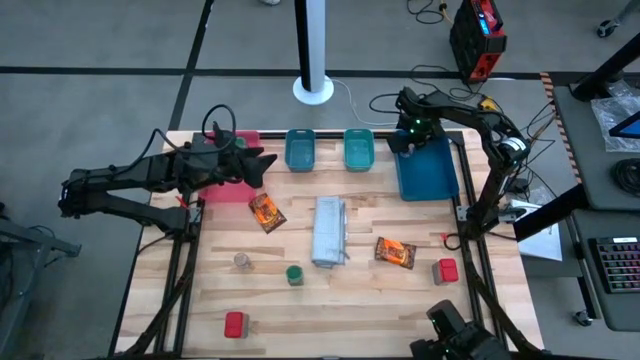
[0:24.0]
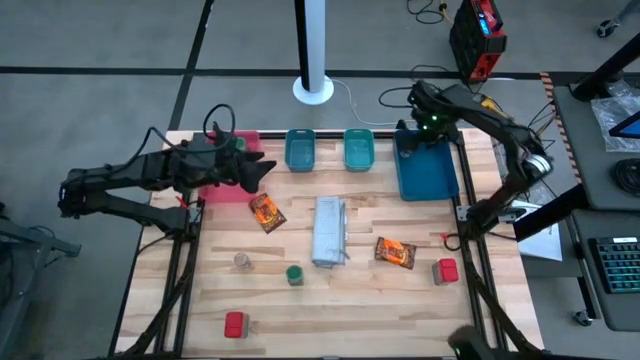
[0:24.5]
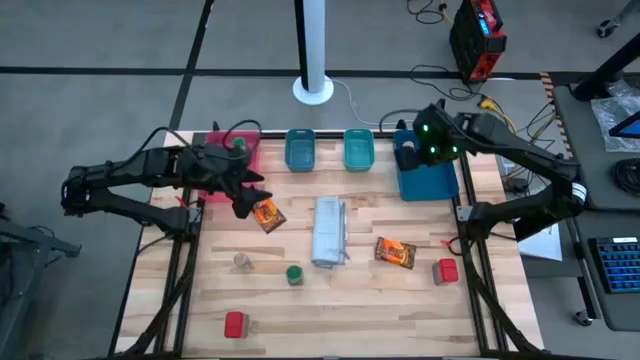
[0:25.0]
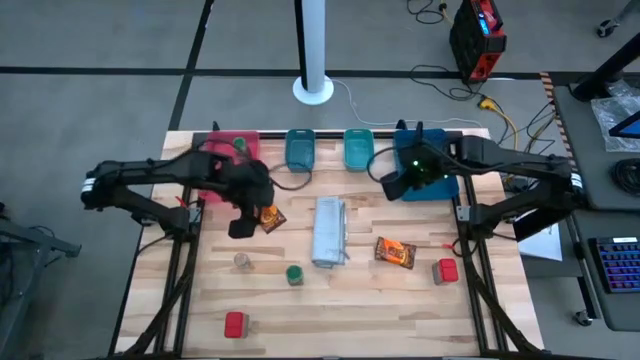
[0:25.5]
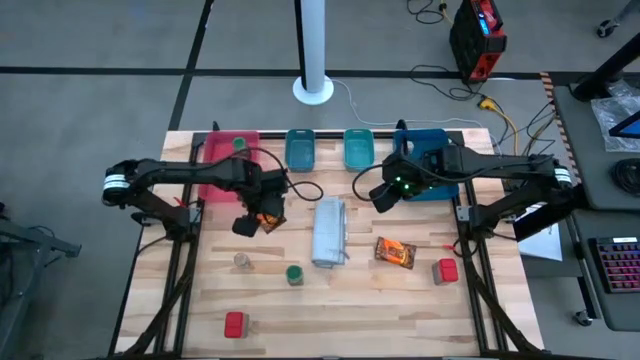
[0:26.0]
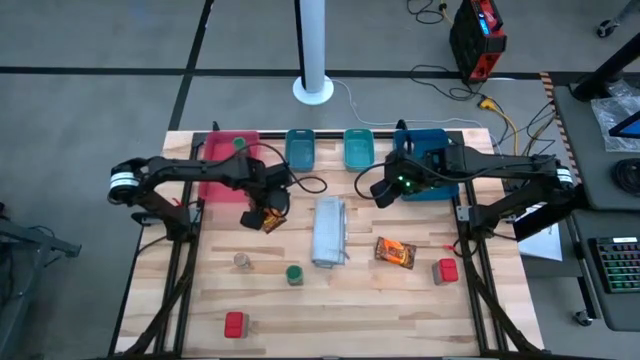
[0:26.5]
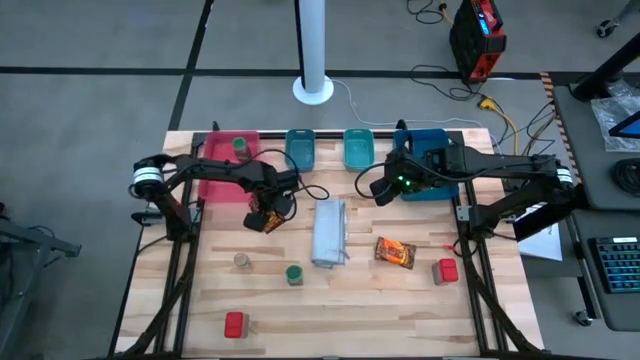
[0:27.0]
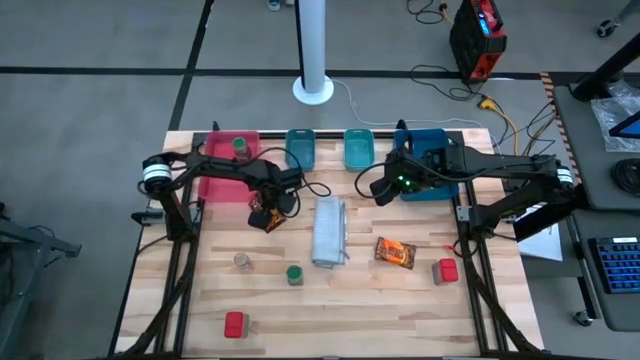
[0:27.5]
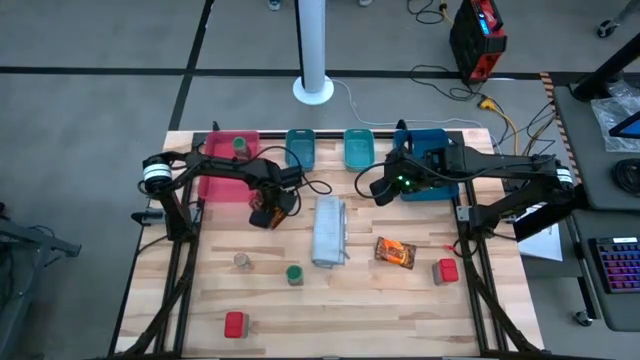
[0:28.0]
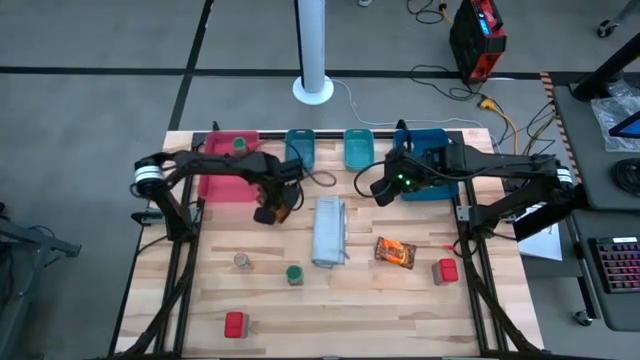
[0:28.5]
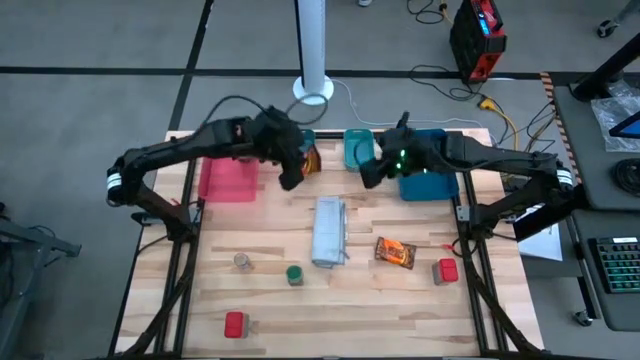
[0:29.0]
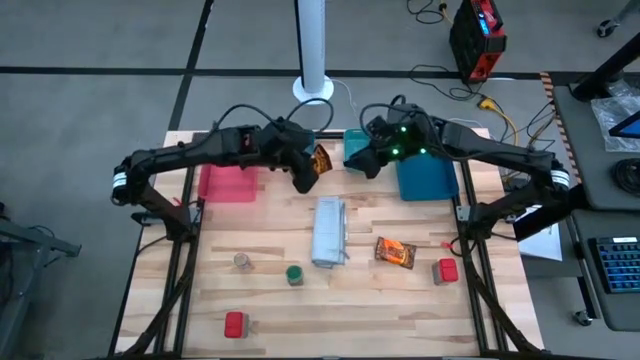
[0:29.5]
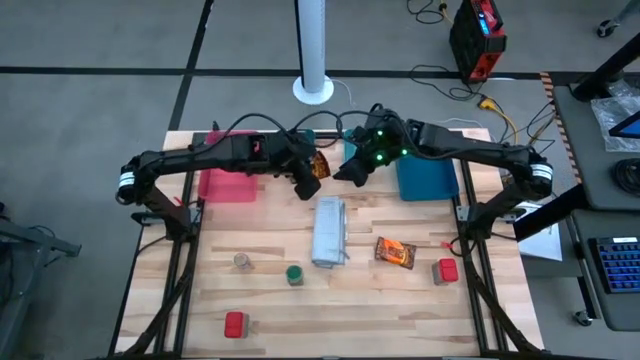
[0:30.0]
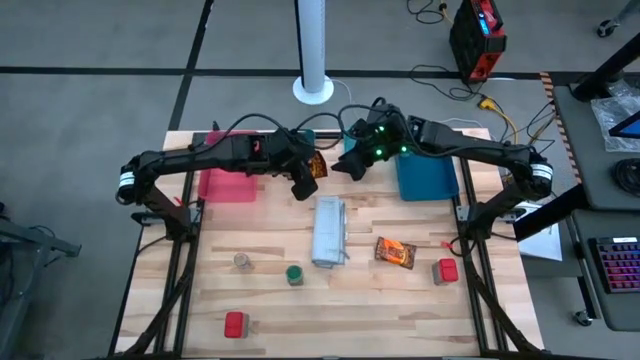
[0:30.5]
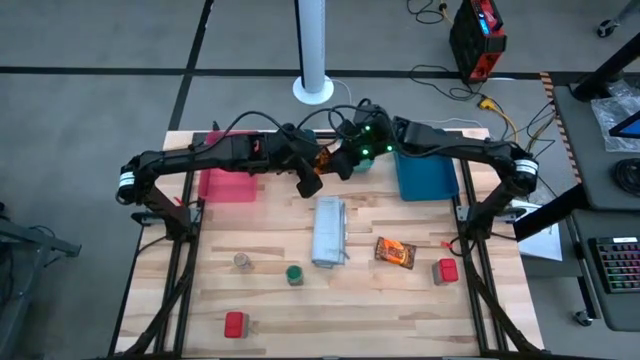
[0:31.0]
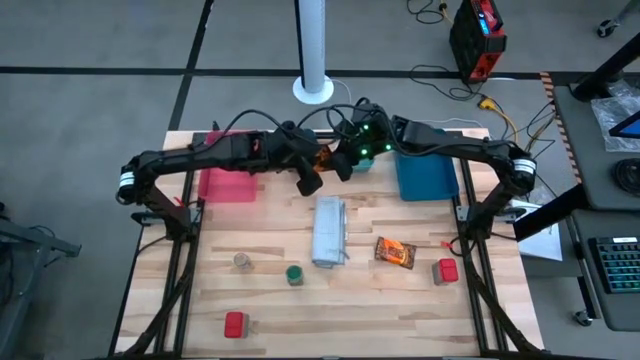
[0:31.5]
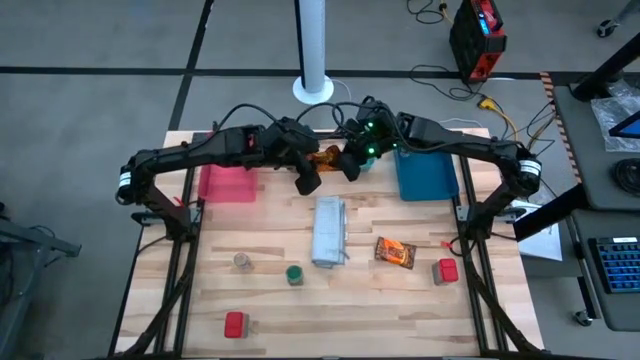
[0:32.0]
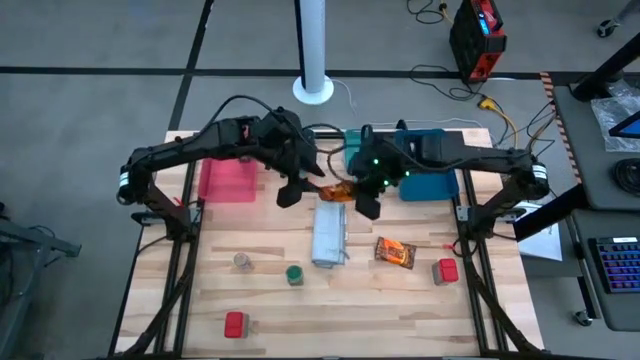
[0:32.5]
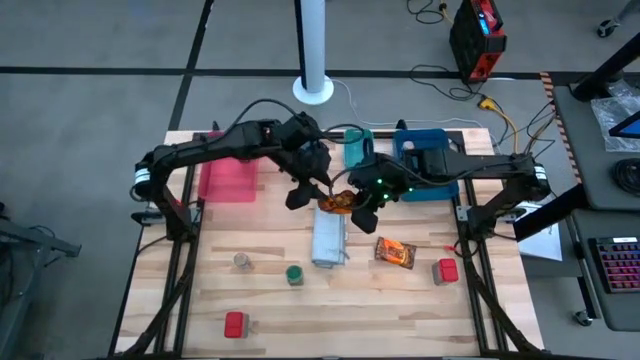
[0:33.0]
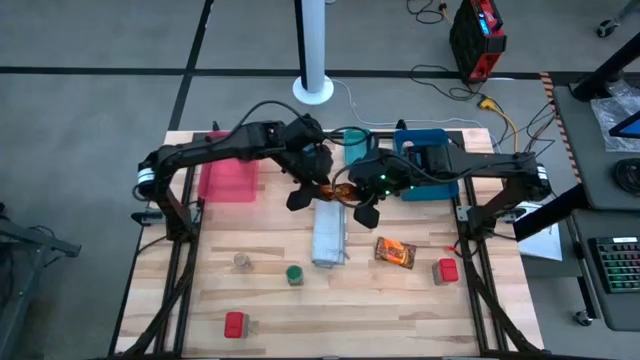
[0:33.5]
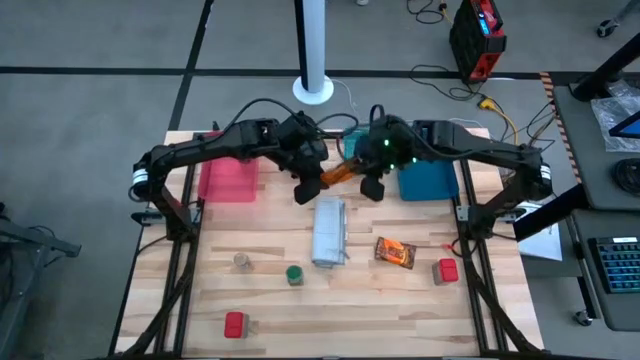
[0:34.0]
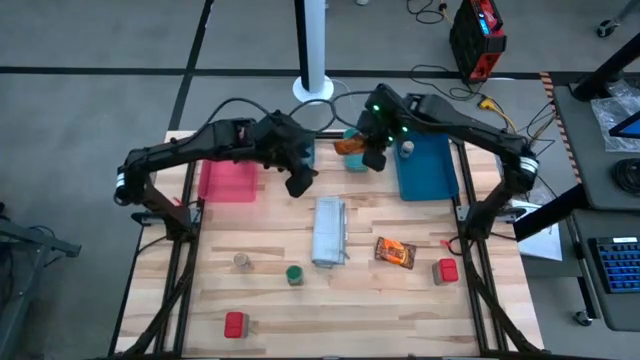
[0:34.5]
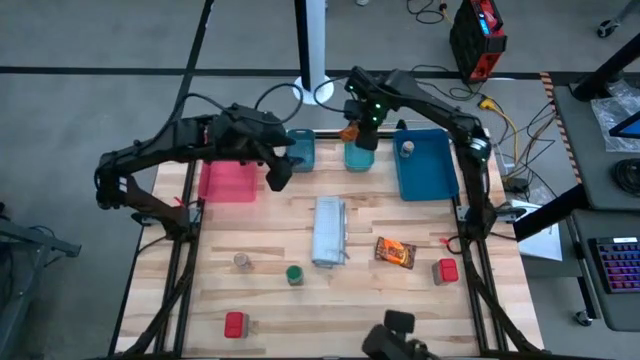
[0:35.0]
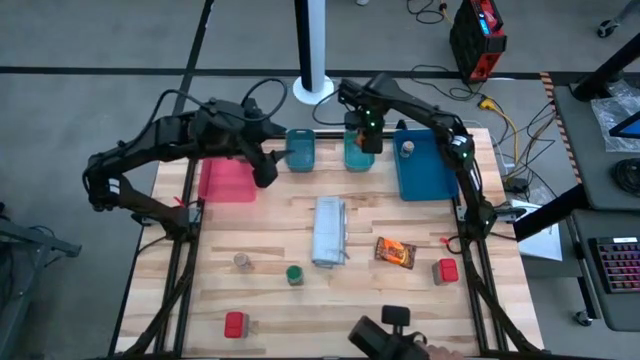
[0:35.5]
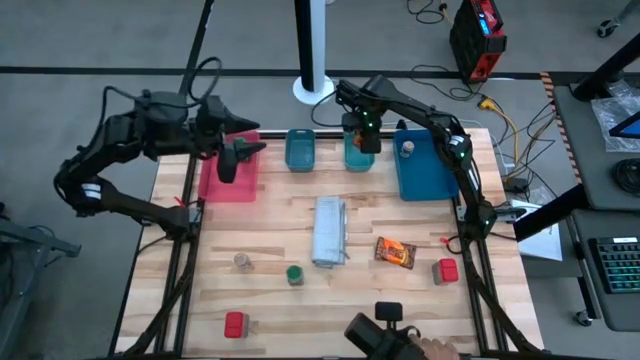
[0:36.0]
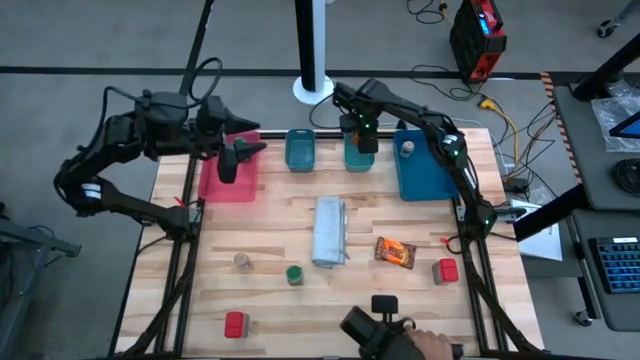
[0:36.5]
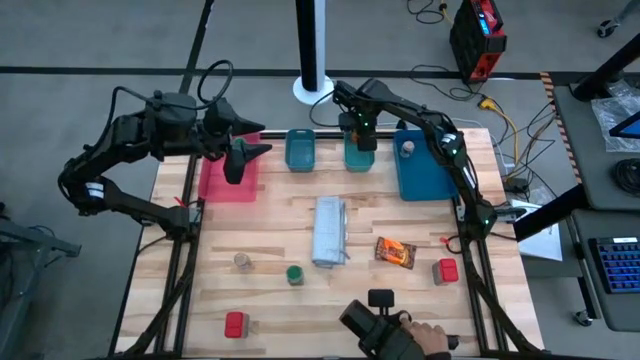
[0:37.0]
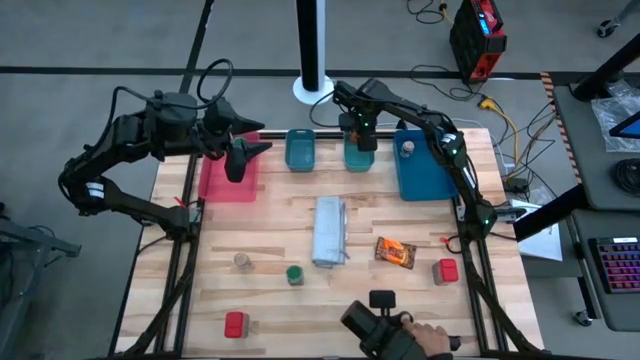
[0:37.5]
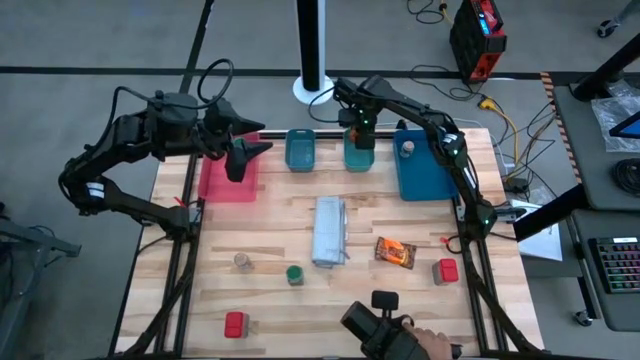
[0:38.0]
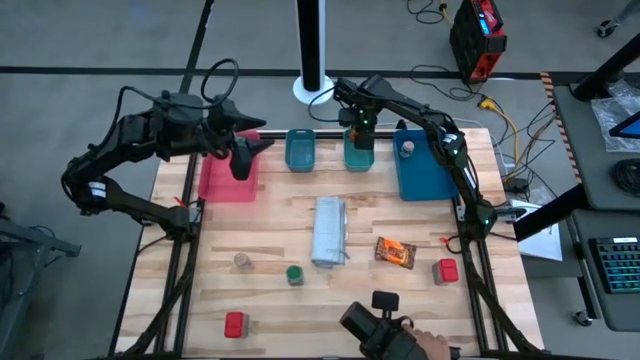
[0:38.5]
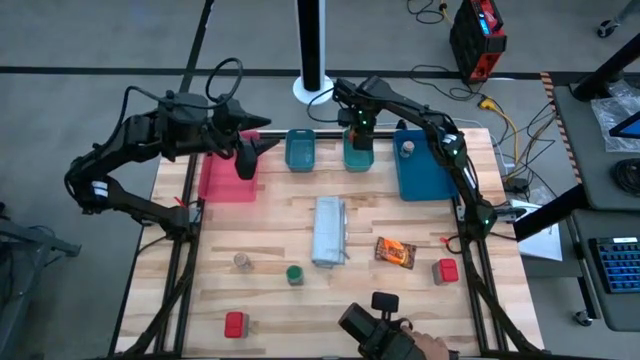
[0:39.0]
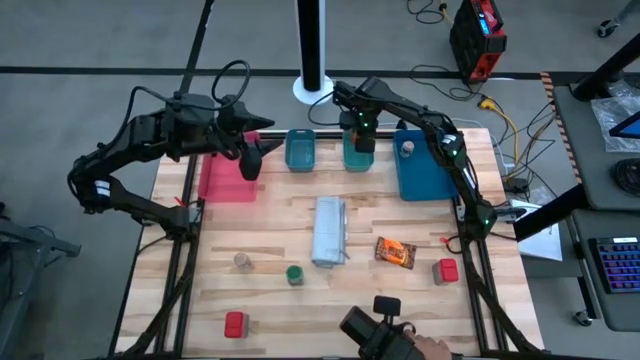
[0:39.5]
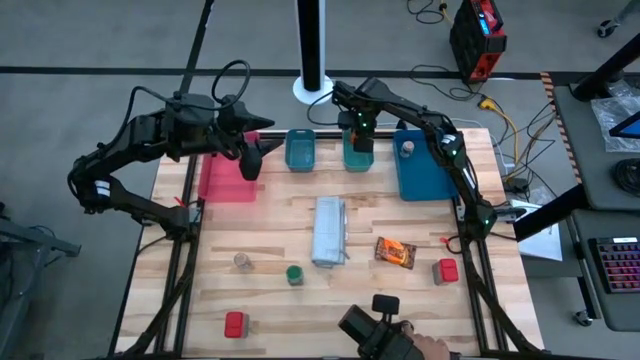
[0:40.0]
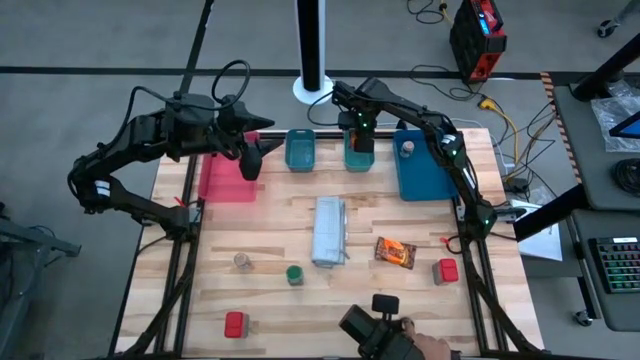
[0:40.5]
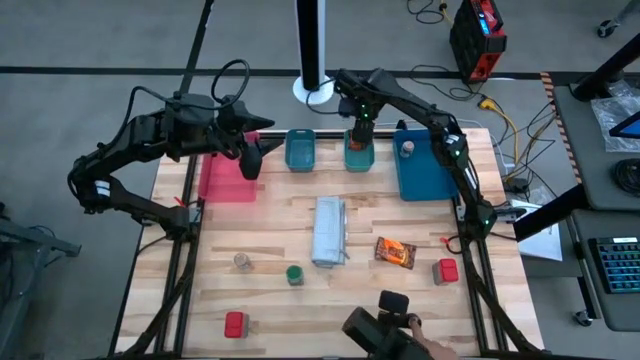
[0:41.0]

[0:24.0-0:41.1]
Task: Sort spices by type
Put the top orange seasoning pack into the green bin

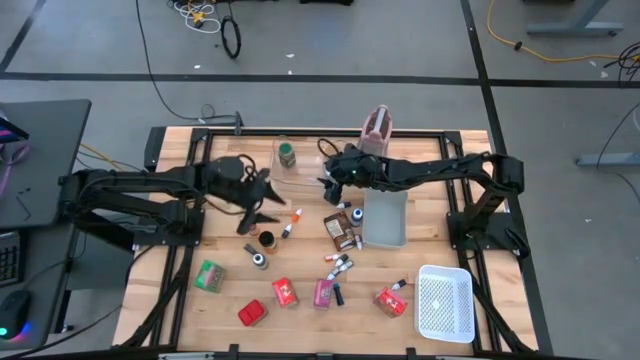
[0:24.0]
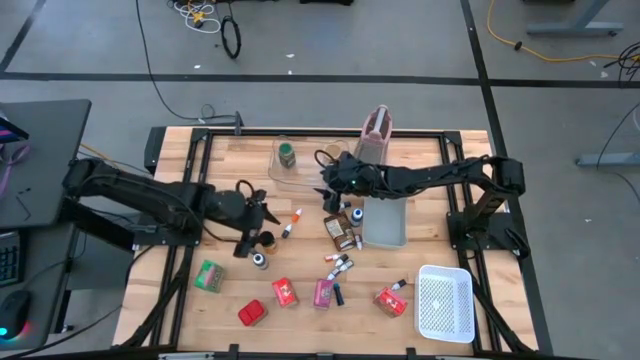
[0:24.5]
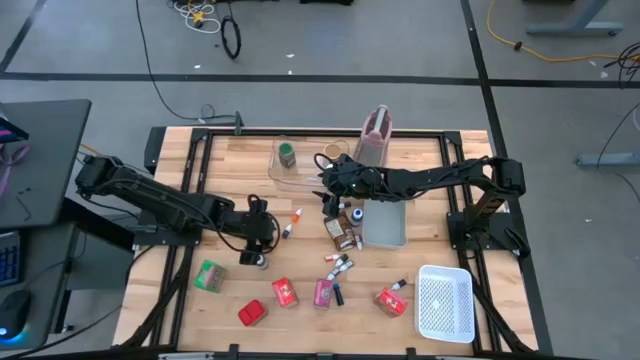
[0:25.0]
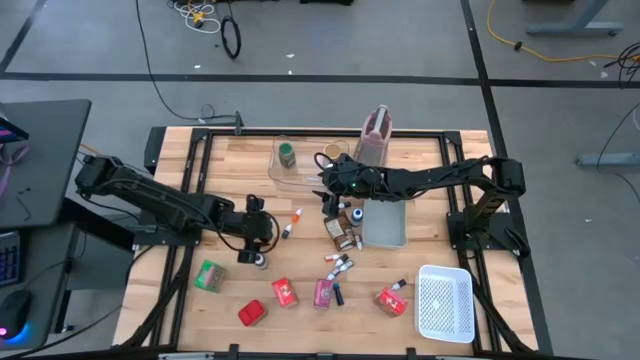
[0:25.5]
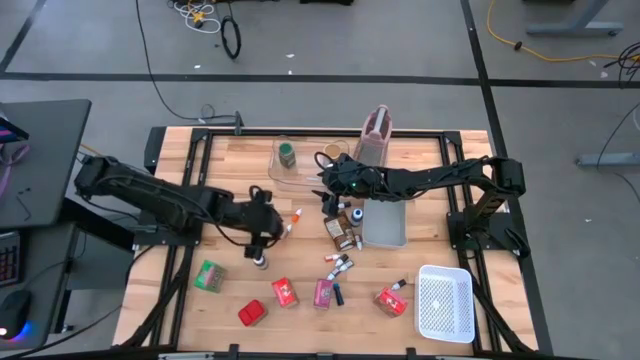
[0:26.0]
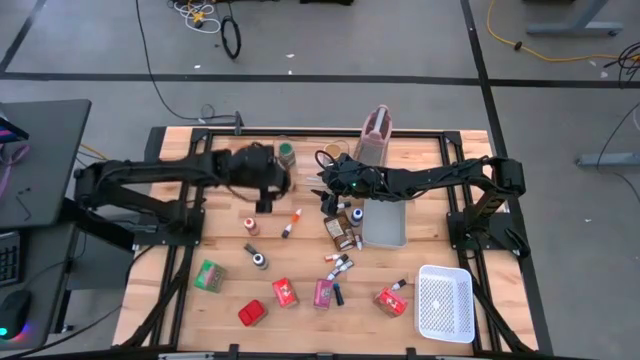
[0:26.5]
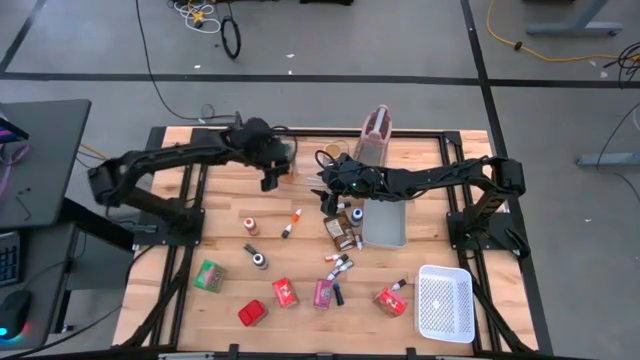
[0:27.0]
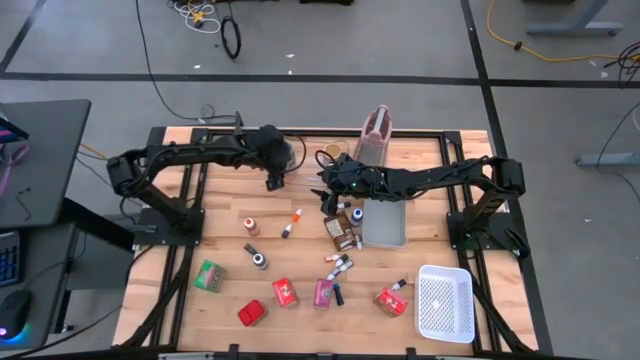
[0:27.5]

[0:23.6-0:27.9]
Task: Pick & Place Kitchen Items
Put the black seasoning bottle into the transparent bin
